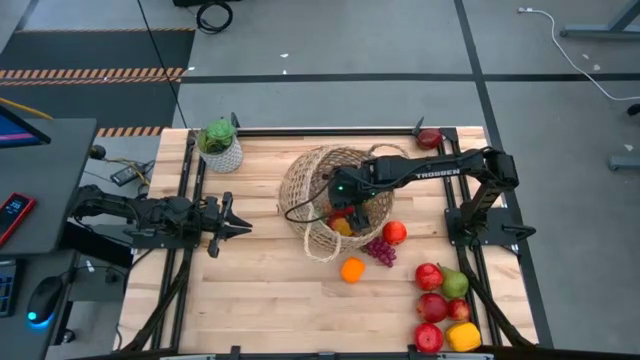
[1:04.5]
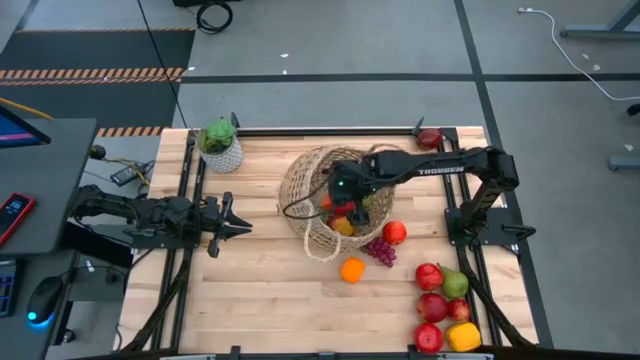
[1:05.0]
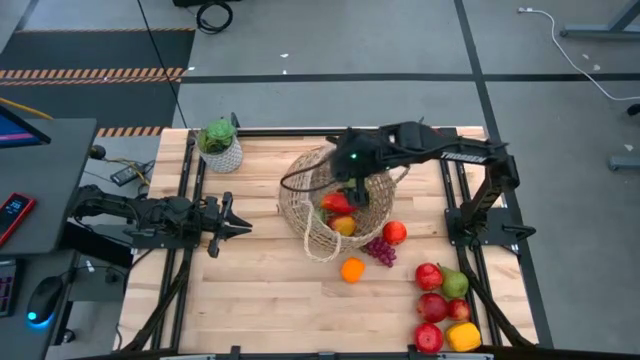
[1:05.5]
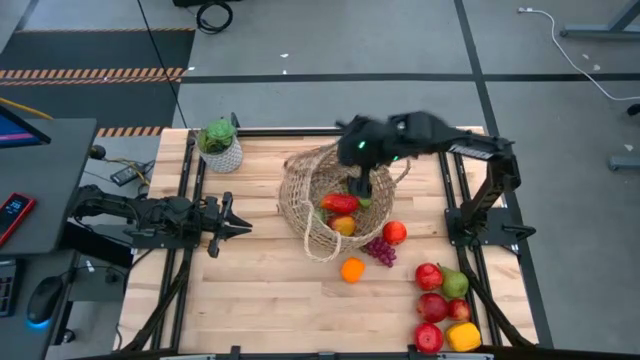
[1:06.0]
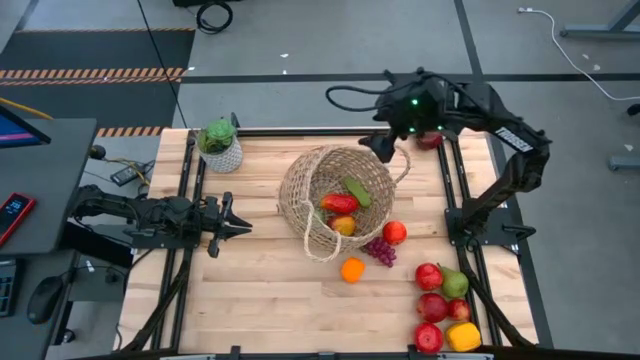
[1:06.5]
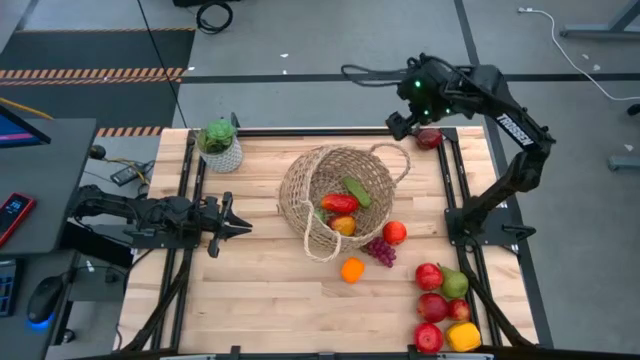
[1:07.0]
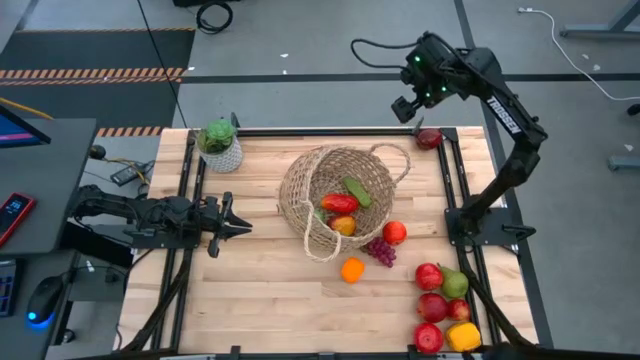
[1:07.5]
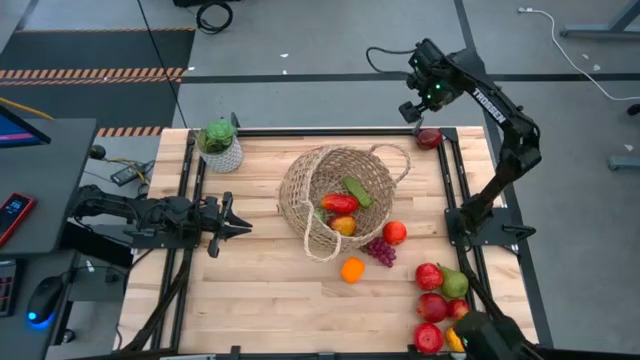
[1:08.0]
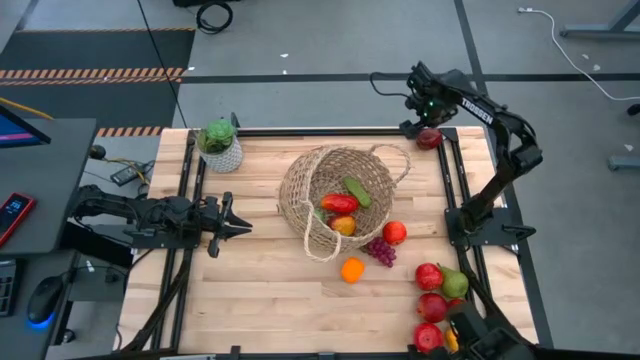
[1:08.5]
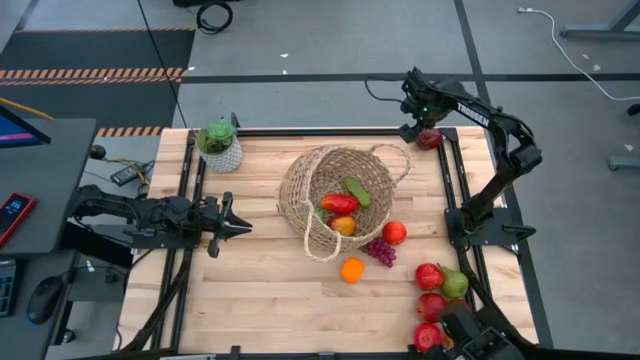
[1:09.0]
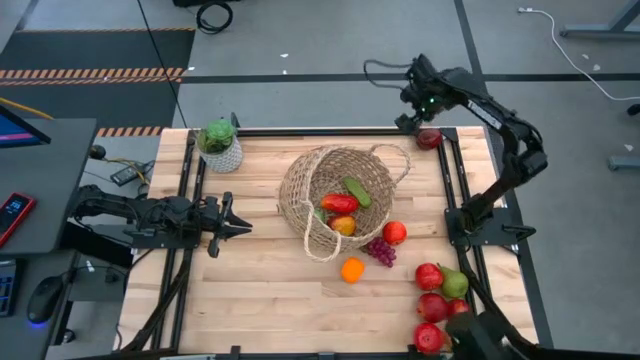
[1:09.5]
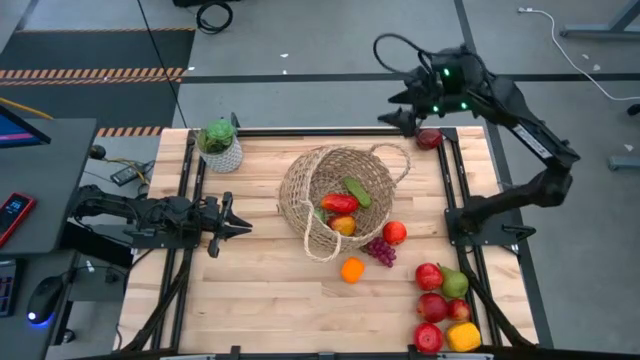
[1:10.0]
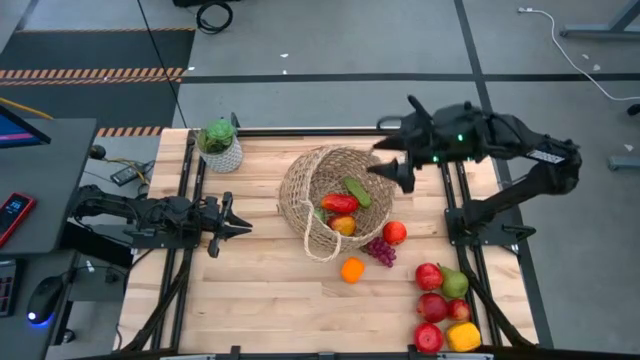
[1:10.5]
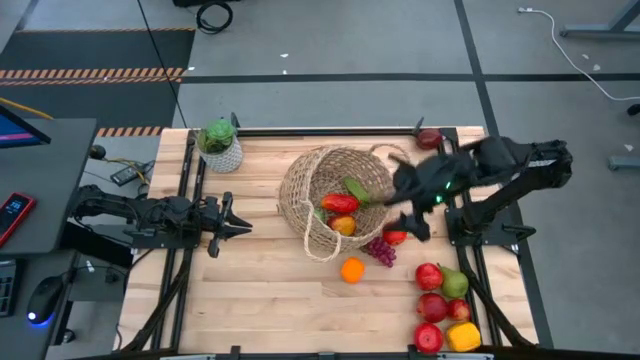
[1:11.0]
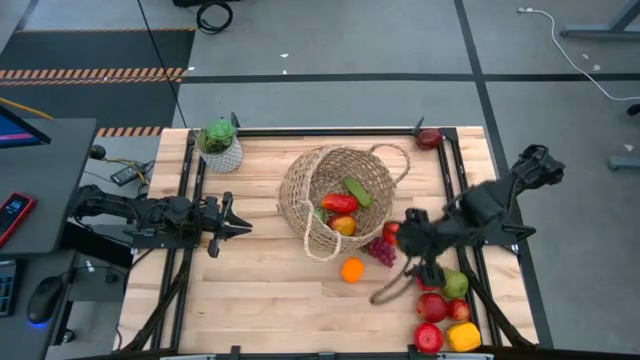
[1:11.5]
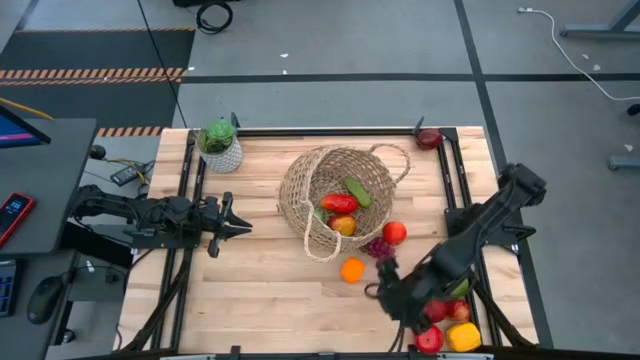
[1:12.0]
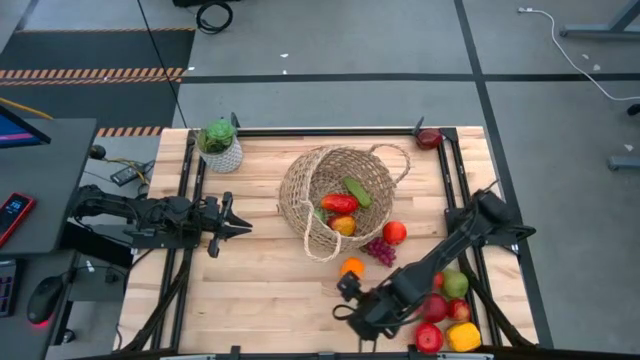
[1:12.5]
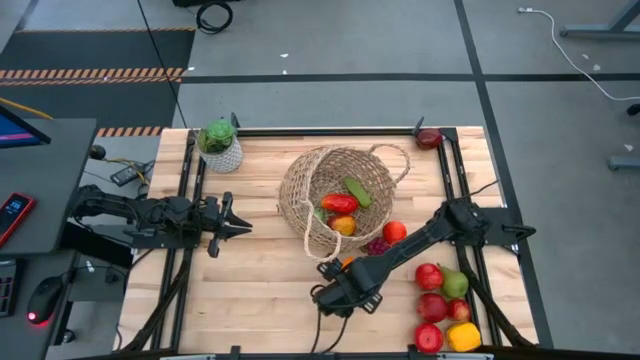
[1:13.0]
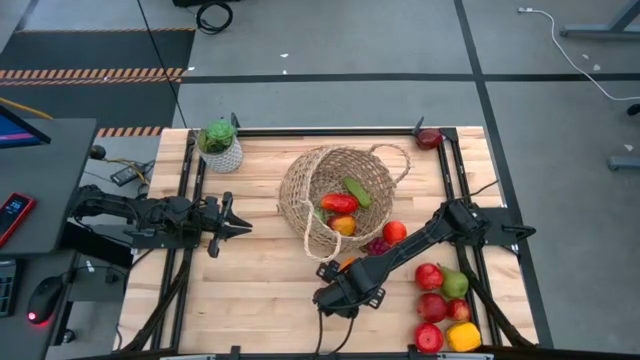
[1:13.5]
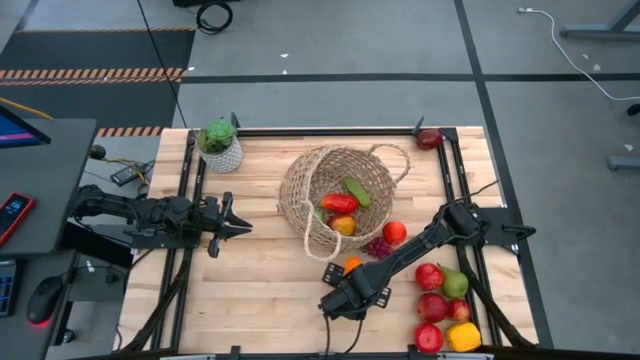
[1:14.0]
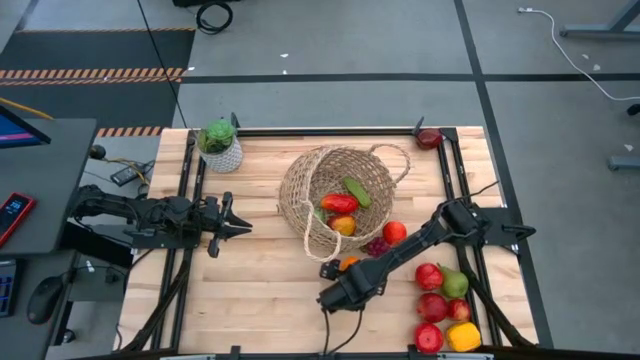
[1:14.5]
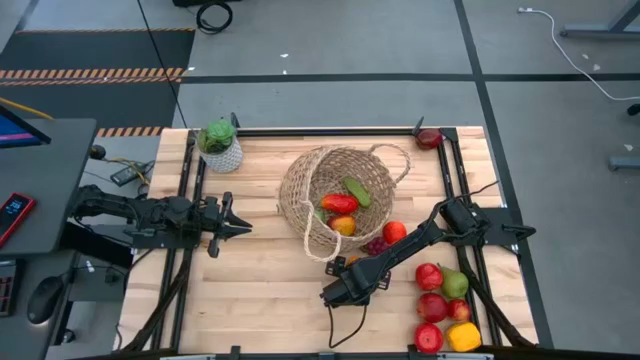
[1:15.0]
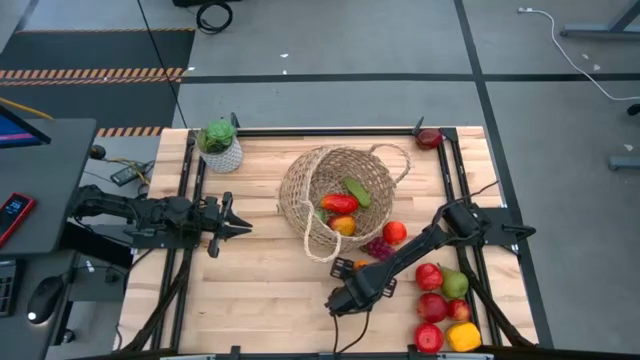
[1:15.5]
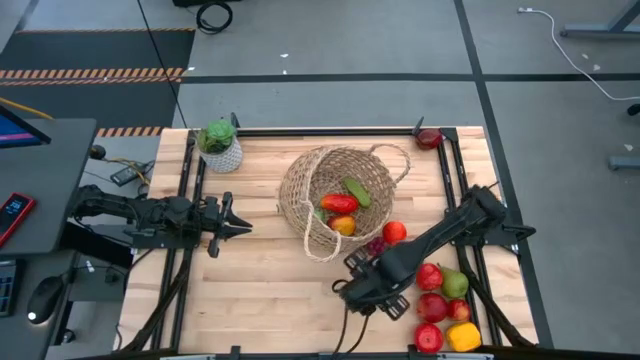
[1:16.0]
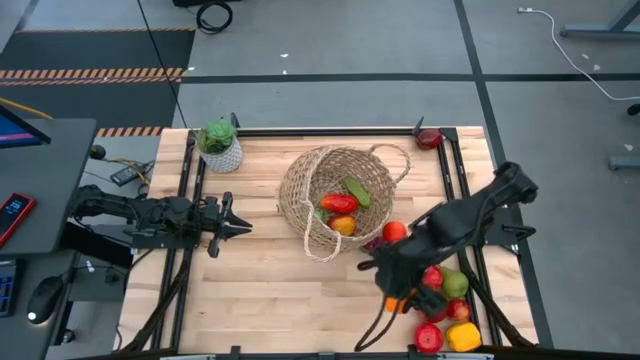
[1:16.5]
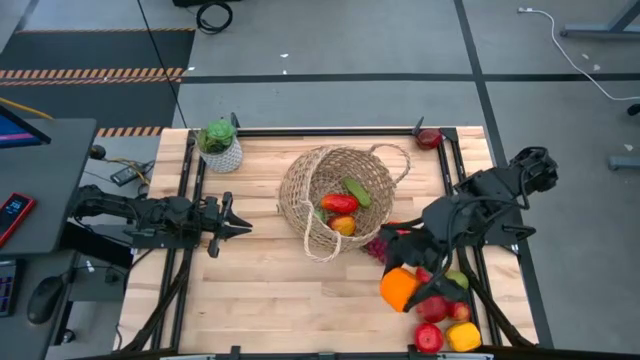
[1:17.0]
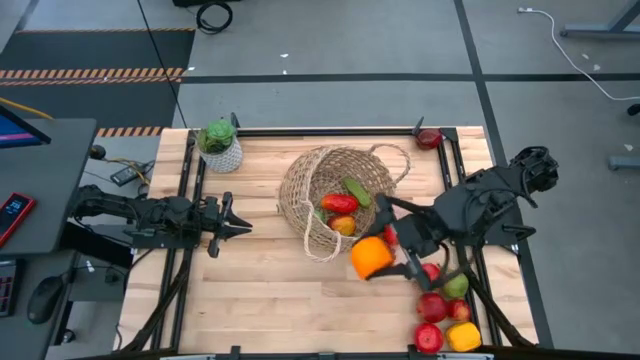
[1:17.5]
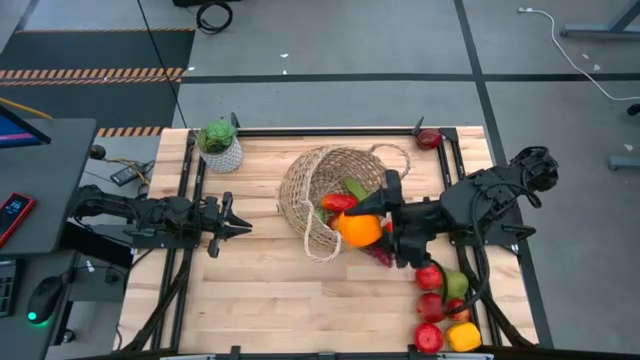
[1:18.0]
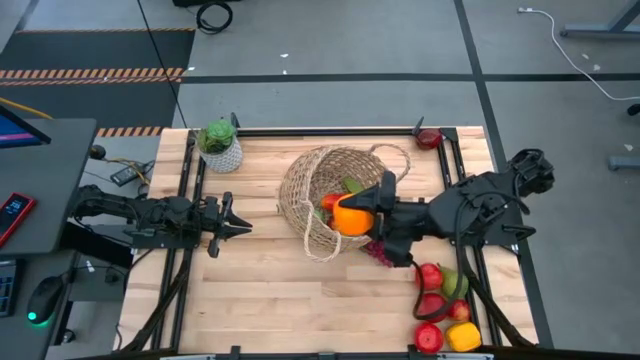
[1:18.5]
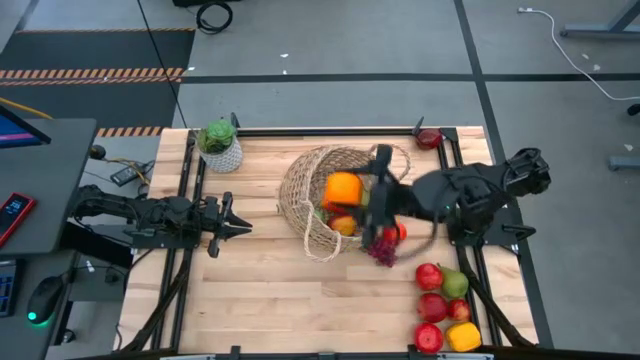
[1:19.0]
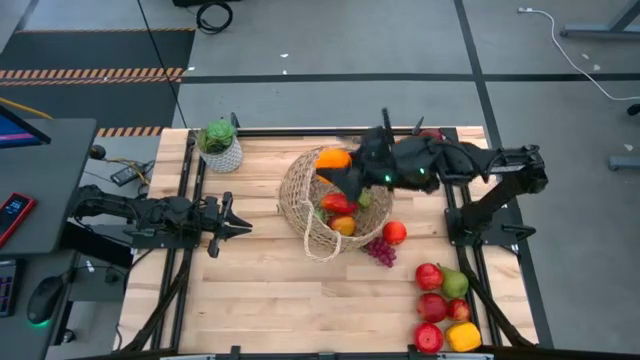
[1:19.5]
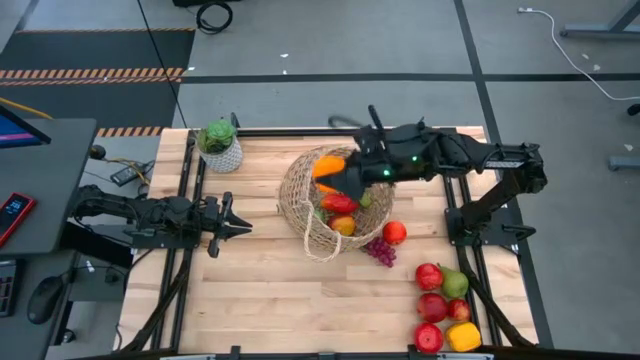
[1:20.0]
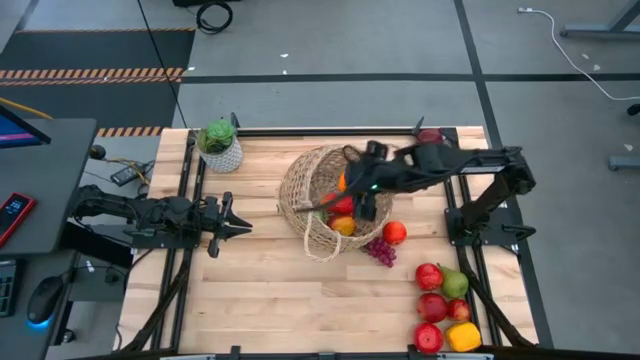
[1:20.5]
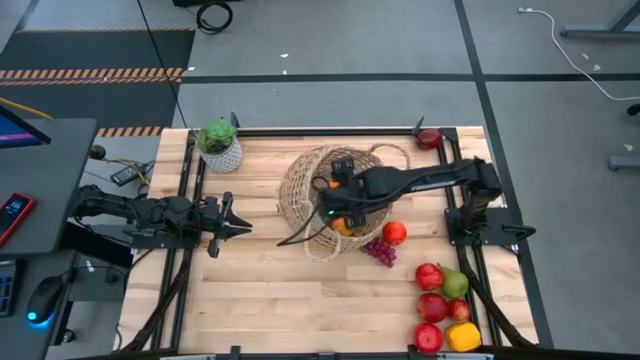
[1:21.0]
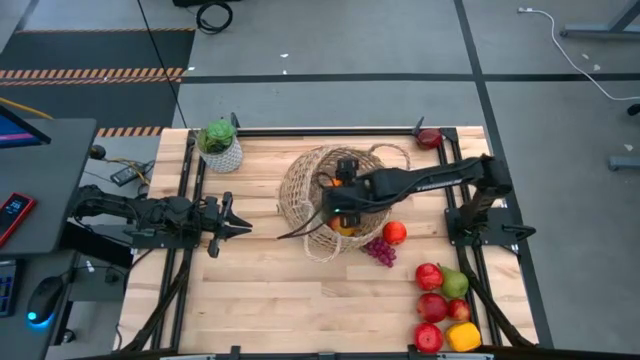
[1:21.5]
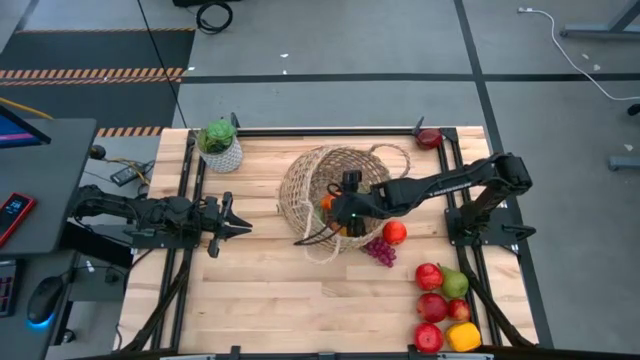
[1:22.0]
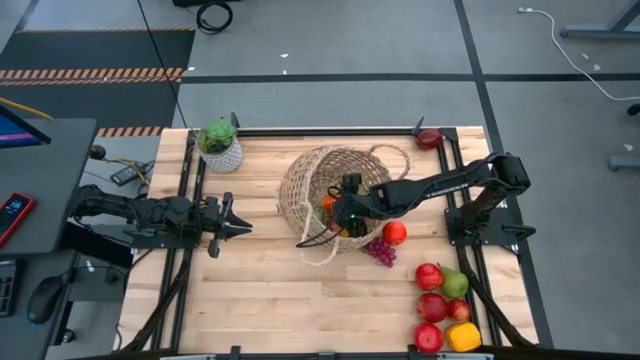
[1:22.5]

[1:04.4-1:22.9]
Task: Build produce basket
Put the orange into the woven basket

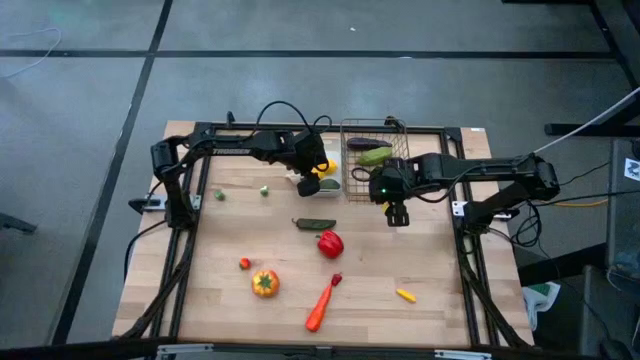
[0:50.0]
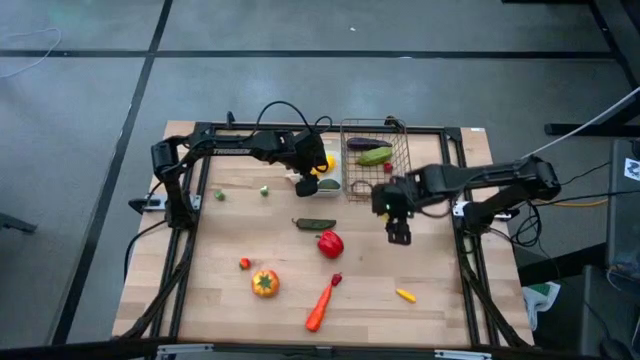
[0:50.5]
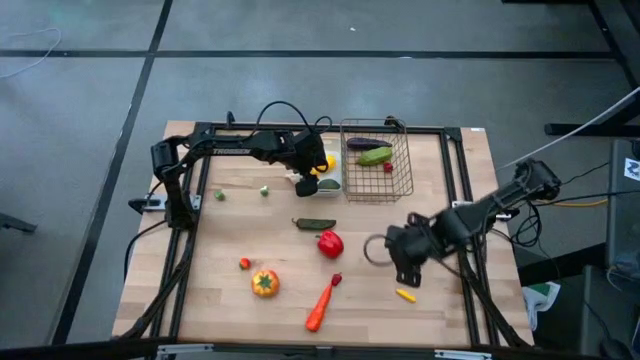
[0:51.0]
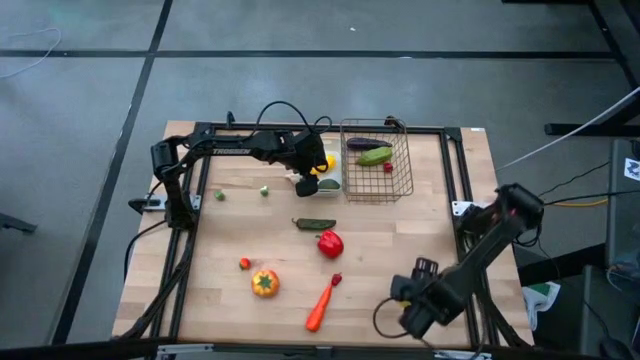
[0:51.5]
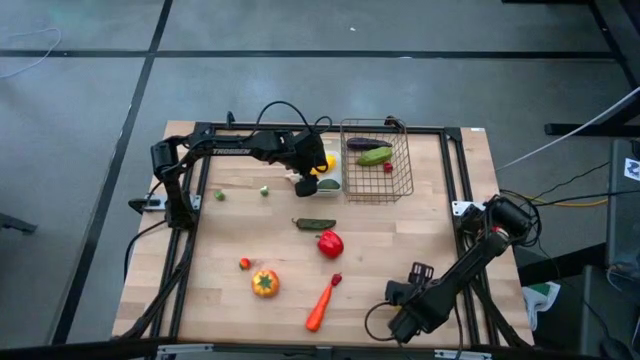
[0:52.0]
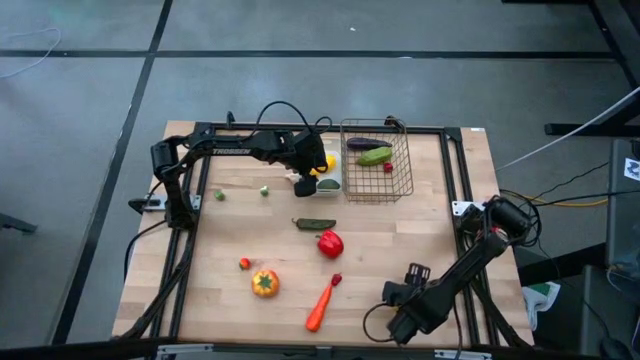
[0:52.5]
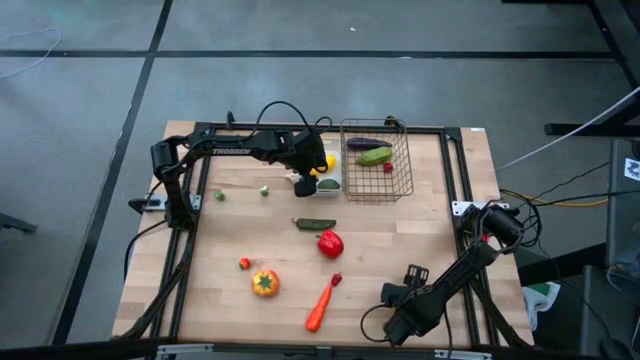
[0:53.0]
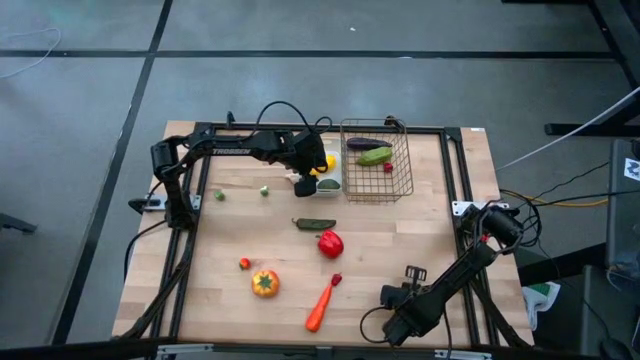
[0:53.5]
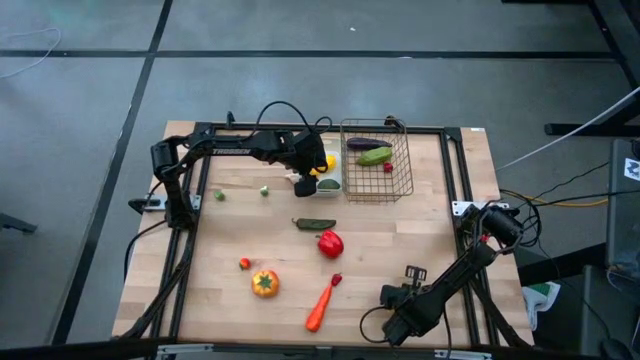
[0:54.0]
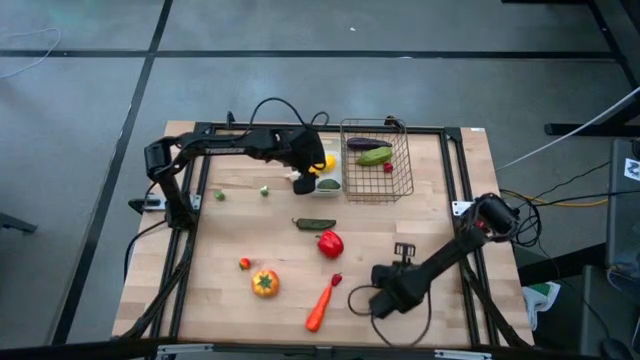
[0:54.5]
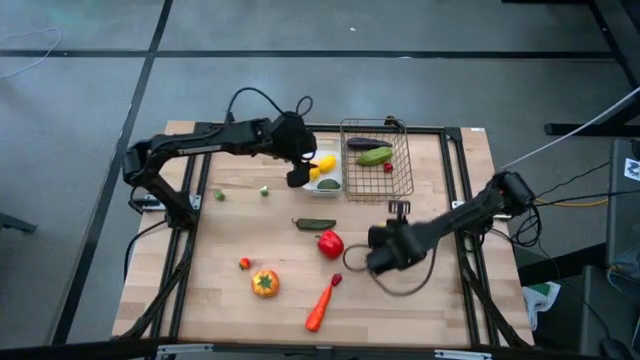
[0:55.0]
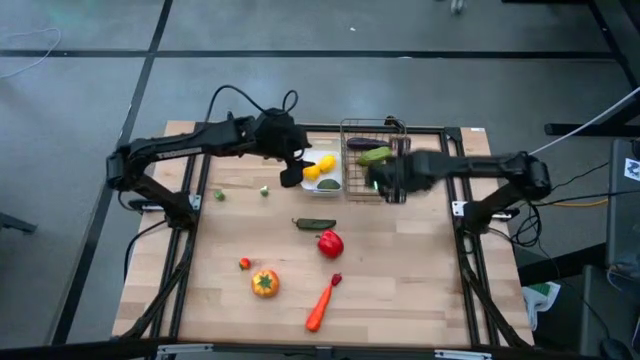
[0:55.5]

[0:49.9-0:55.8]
Task: Sort produce into baskets
Put the yellow corn into the gold wire basket
